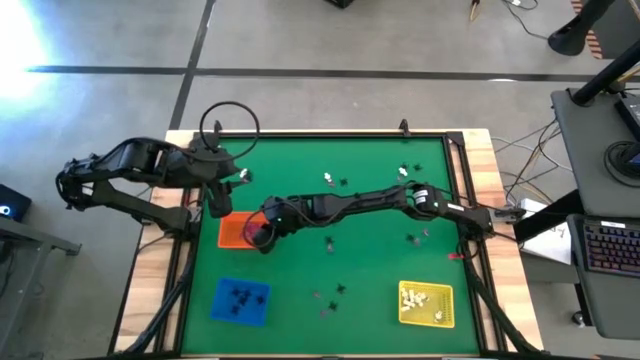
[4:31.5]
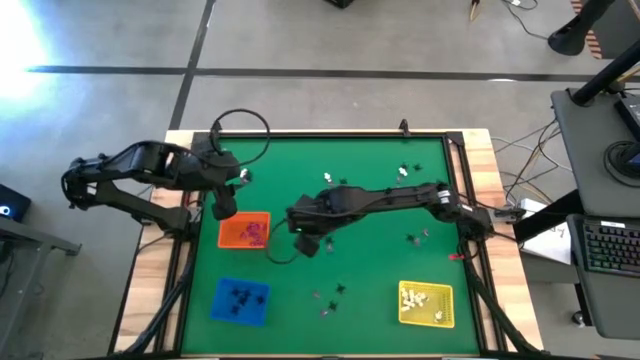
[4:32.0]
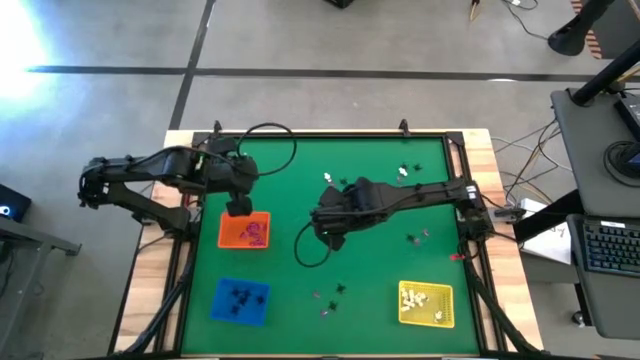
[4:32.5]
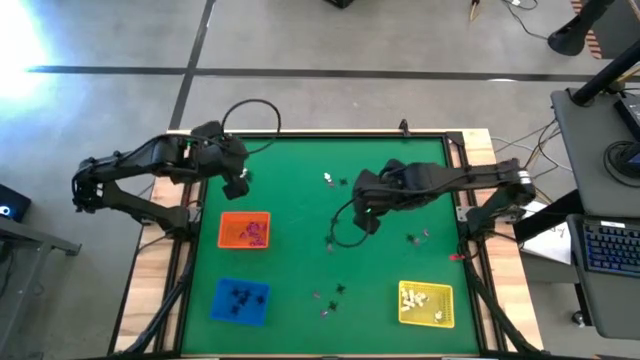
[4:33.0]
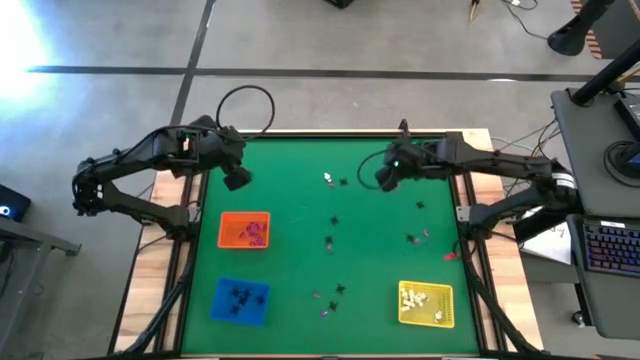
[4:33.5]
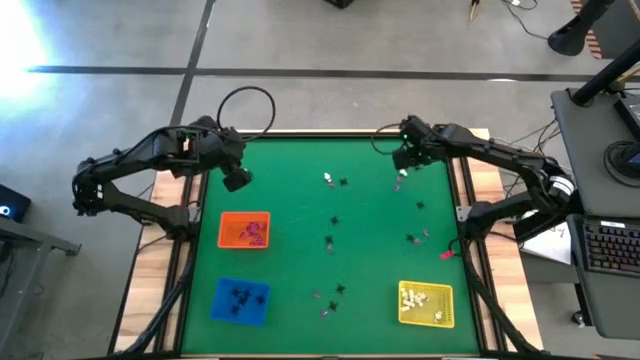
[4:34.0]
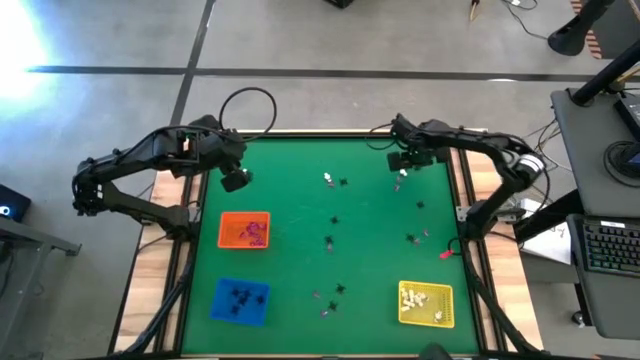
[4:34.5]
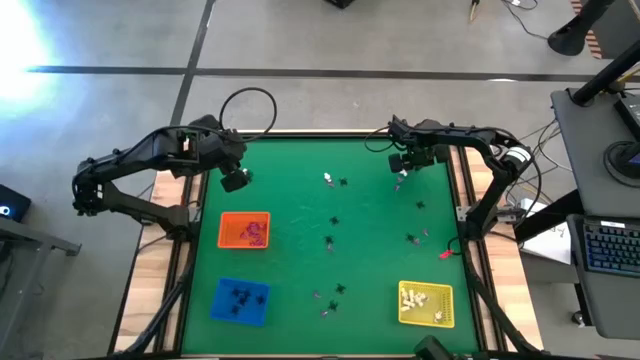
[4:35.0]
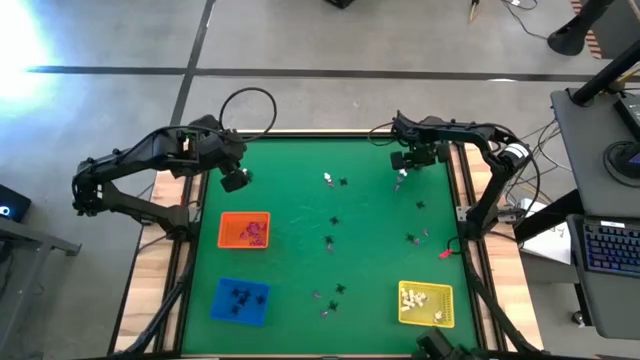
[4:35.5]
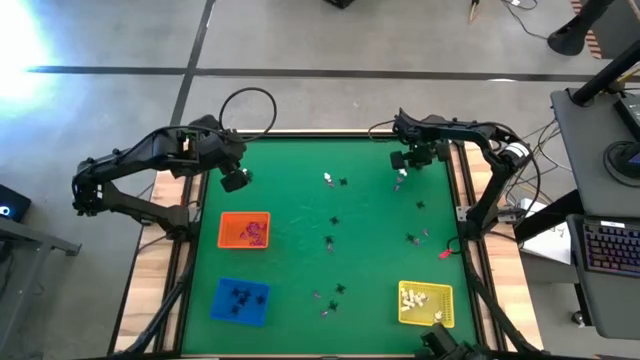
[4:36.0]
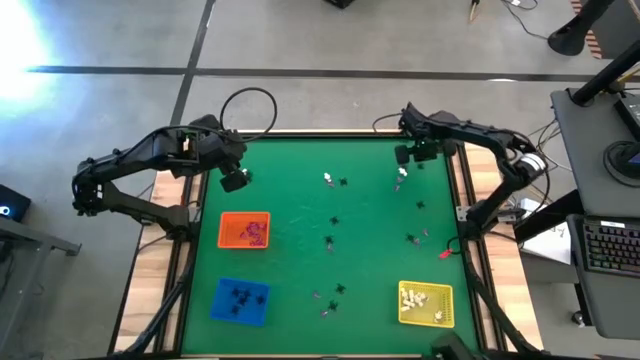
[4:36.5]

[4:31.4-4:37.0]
Task: Sort Halloween decoration
Put the black spider toy into the blue bin

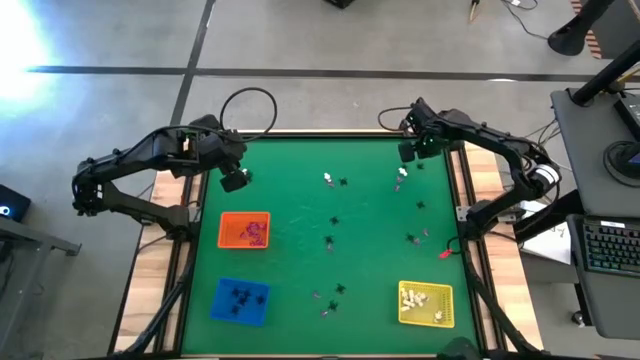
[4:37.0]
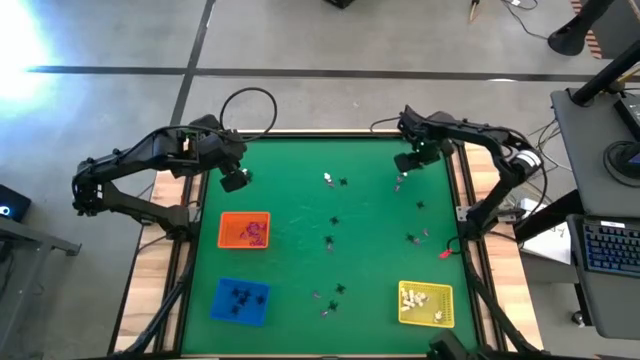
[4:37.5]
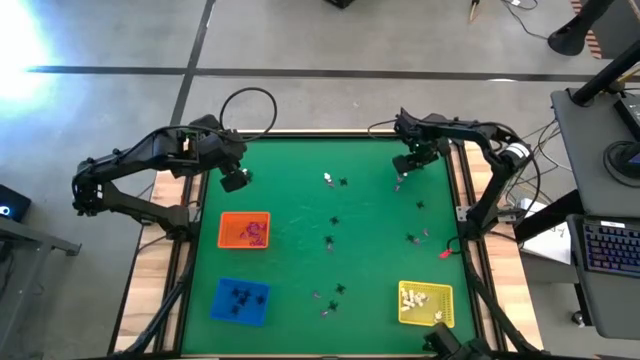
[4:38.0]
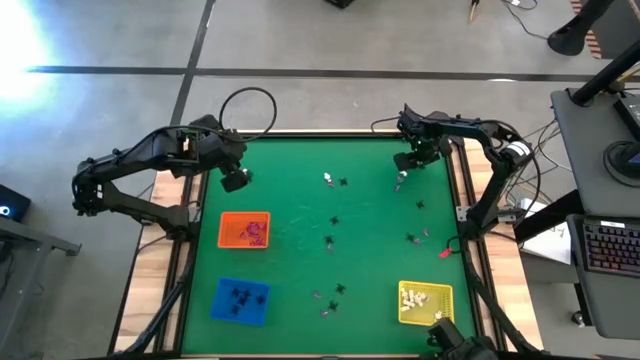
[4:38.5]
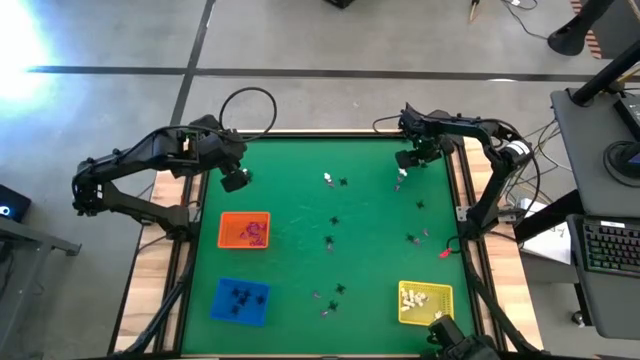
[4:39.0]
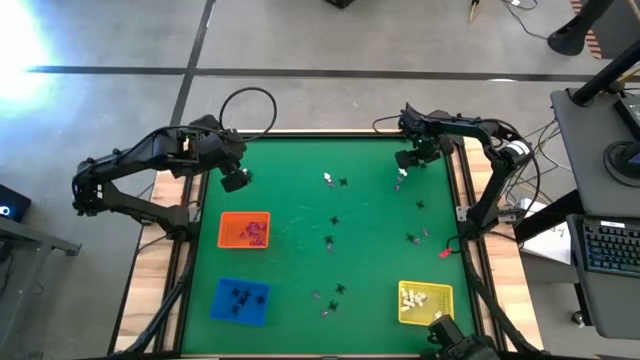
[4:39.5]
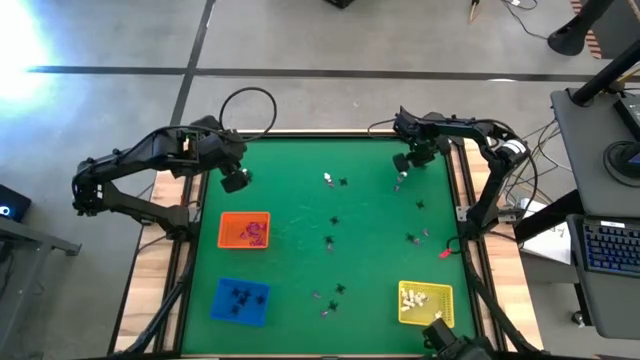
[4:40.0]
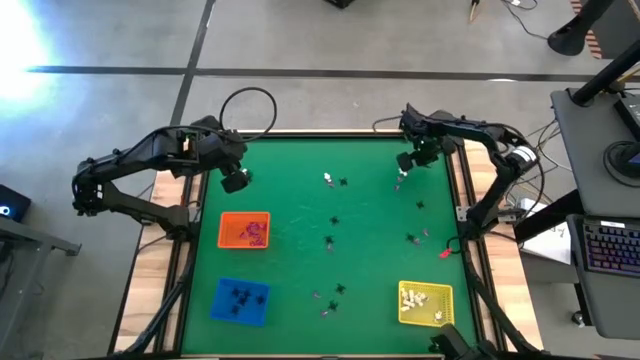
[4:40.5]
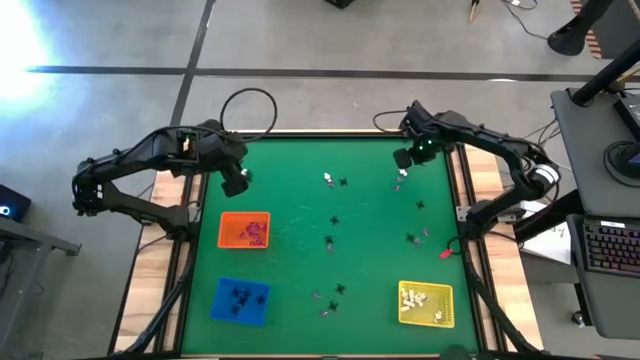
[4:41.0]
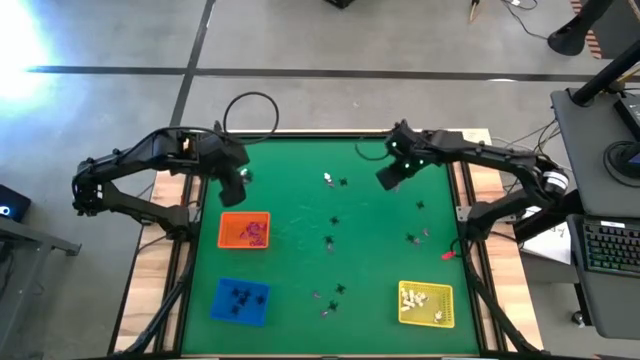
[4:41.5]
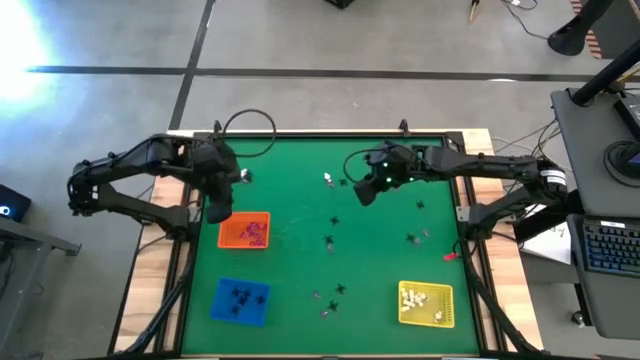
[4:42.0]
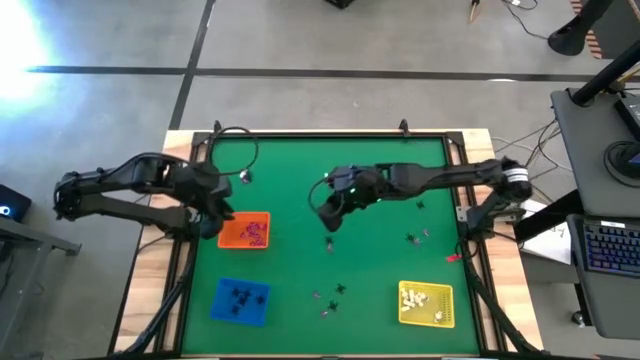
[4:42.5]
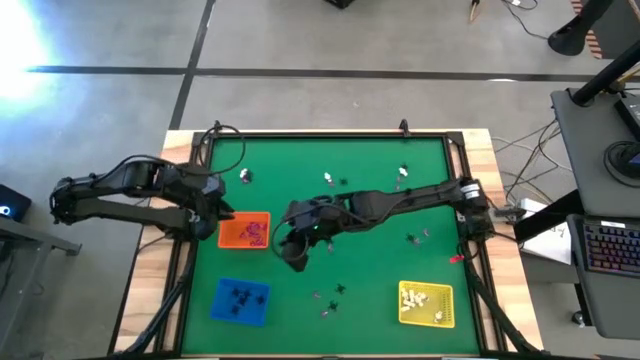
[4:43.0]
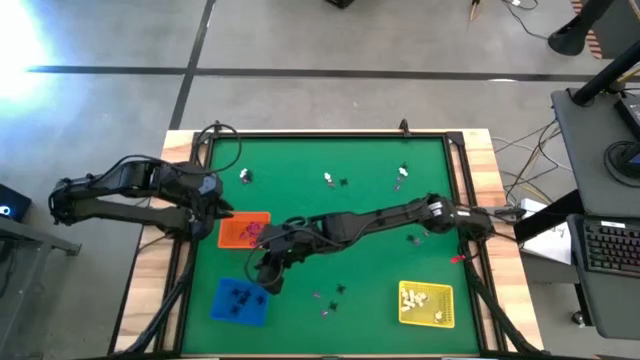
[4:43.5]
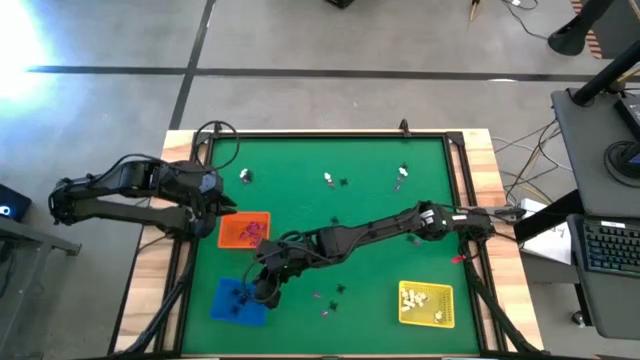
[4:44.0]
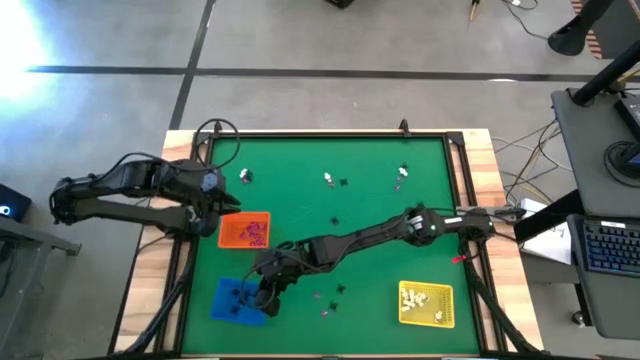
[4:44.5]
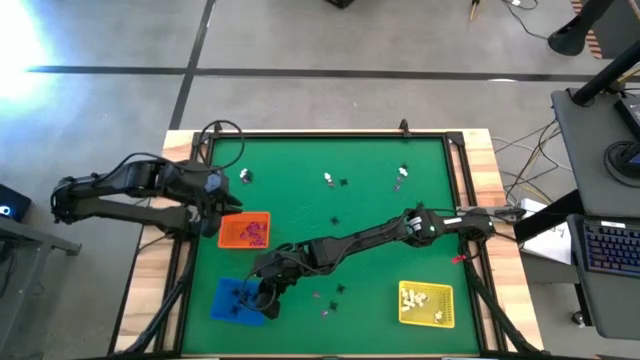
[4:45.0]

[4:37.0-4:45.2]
Put the black spider toy into the blue bin

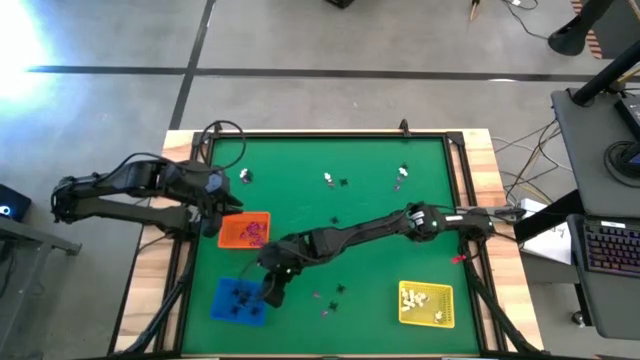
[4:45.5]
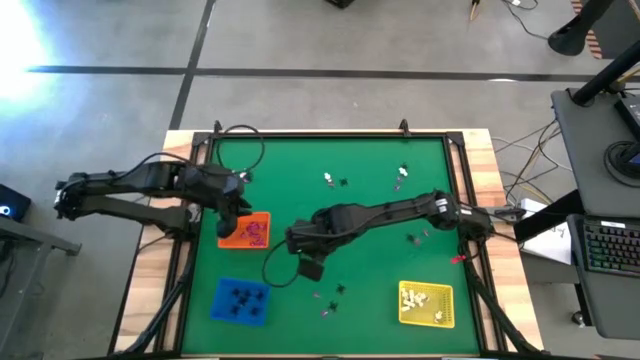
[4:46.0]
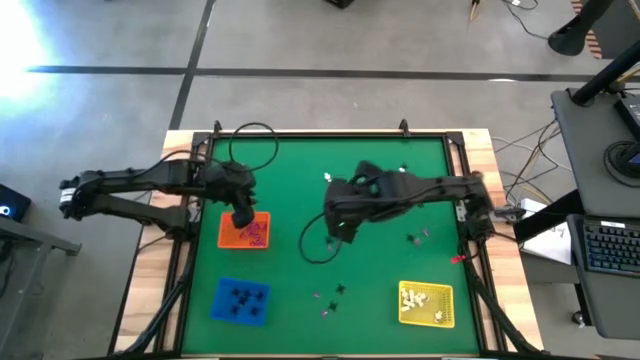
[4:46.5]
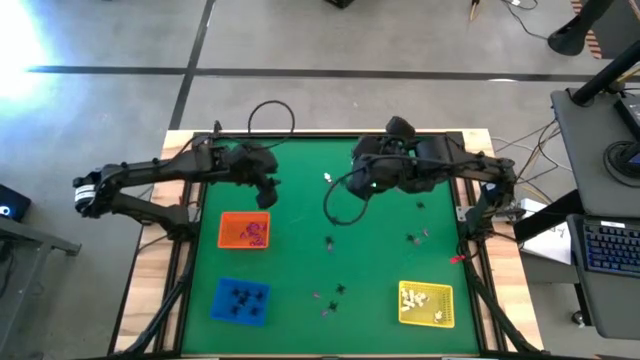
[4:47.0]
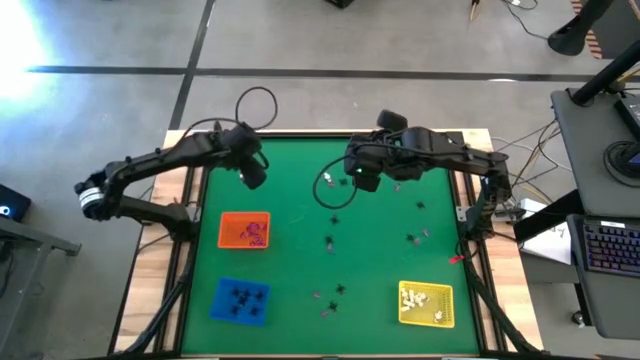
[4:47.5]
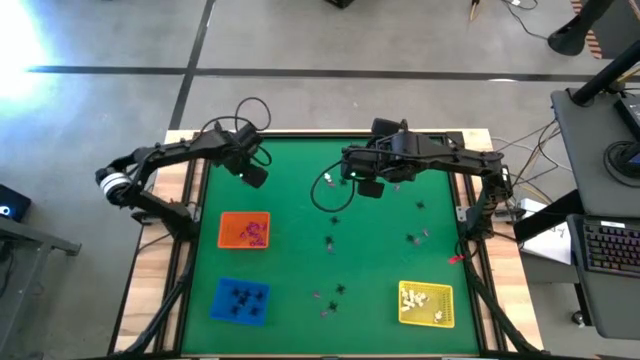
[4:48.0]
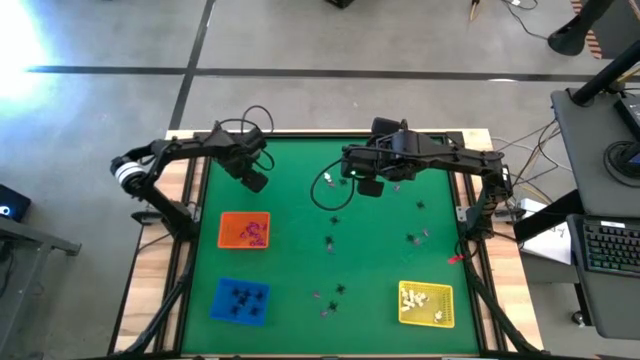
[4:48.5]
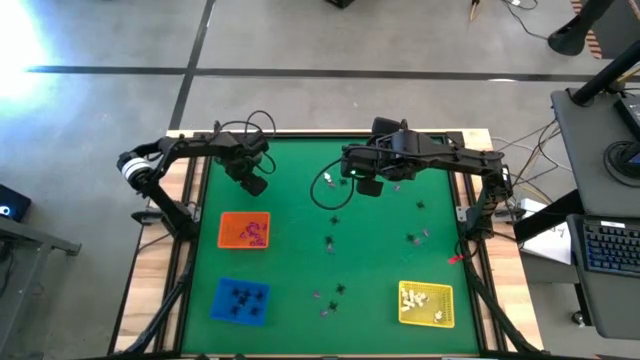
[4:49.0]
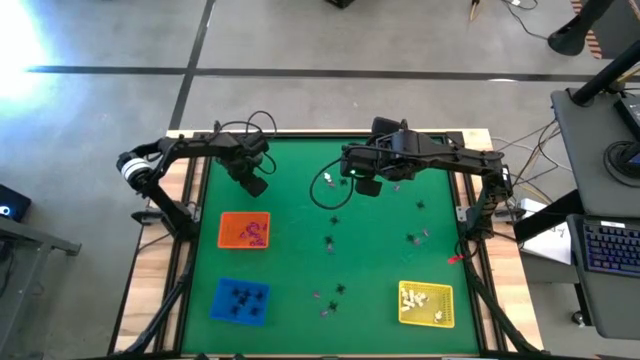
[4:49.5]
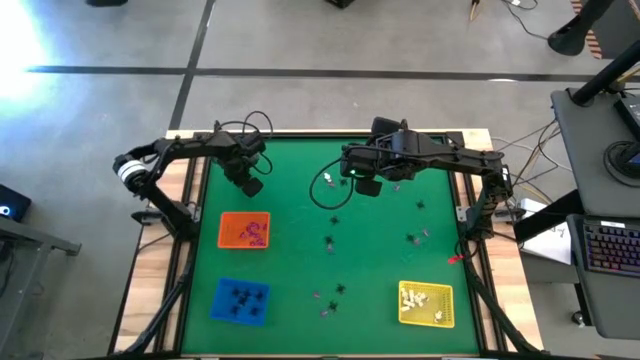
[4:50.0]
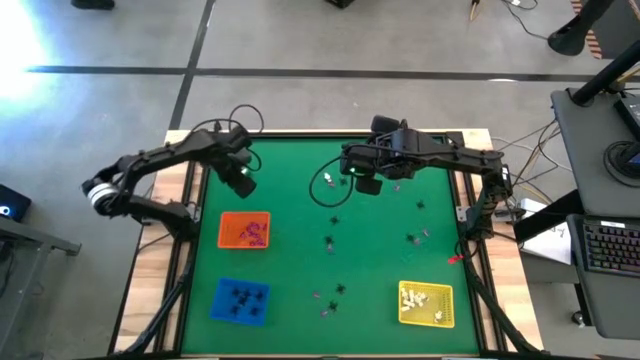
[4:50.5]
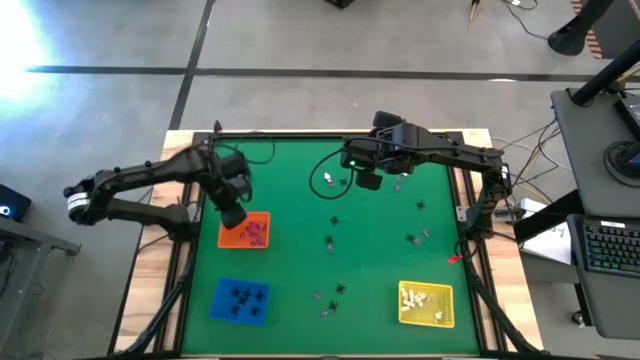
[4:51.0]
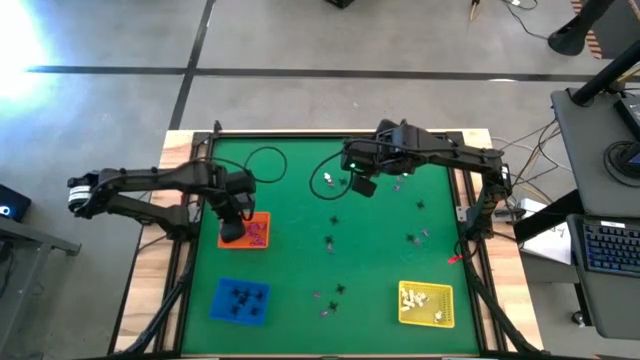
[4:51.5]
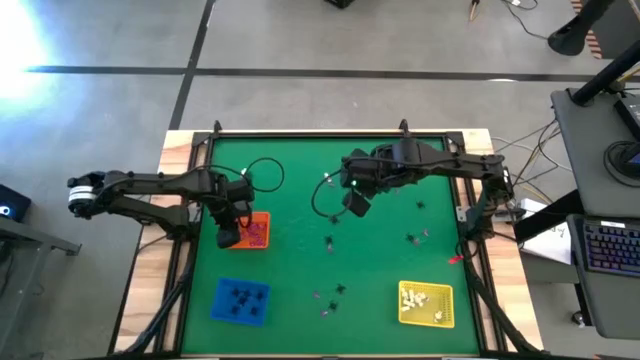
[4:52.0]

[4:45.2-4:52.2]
Put the violet witch hat toy into the orange bin

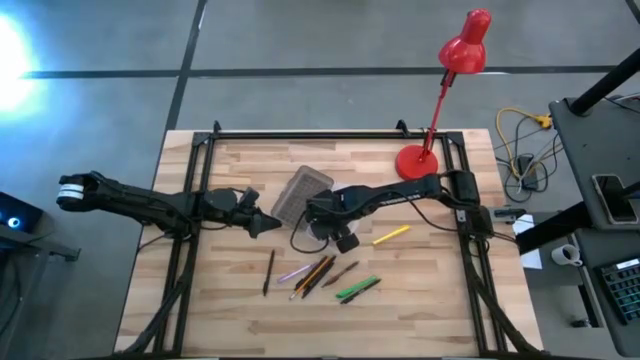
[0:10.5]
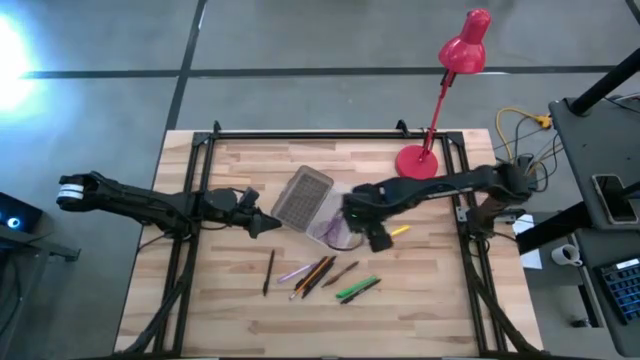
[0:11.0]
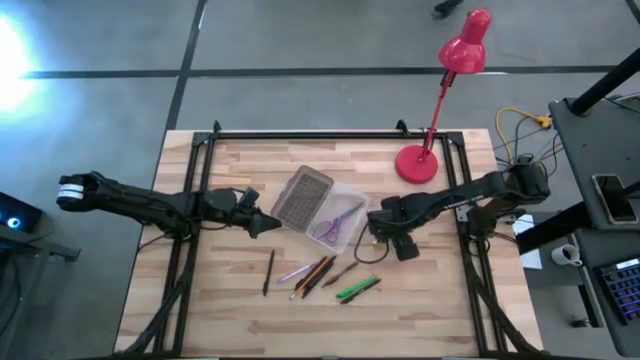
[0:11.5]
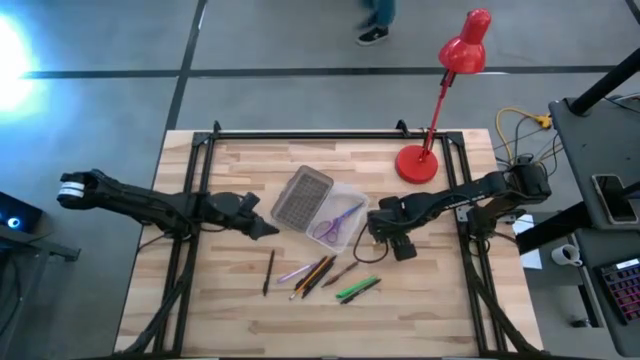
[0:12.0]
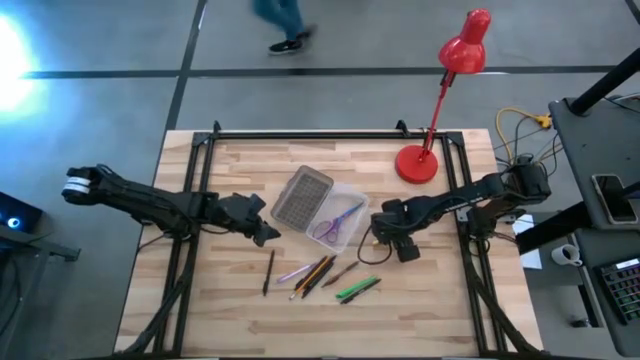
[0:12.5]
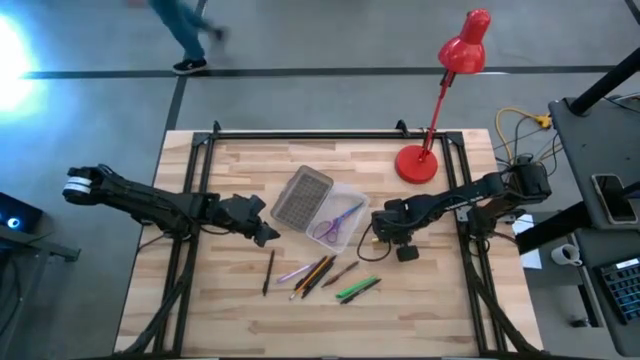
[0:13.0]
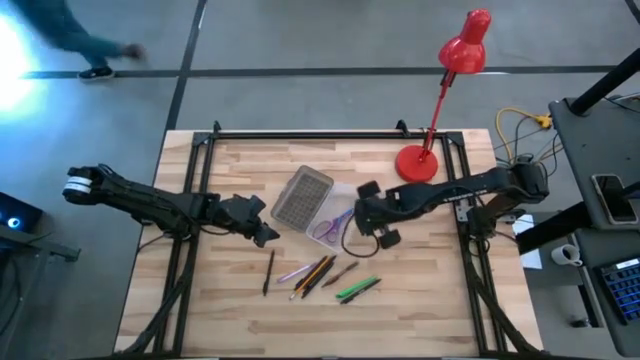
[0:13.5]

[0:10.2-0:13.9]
Task: Pick & place school supplies into a supply box
Put the yellow pen into the gray supply box
